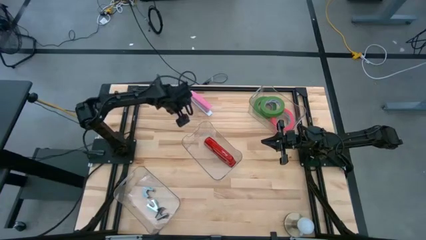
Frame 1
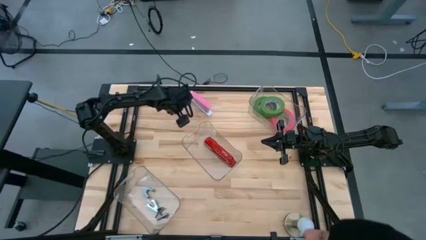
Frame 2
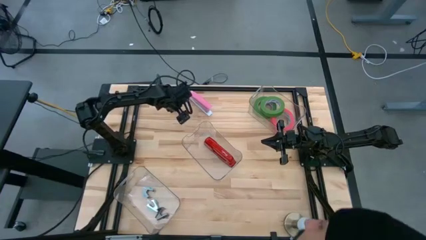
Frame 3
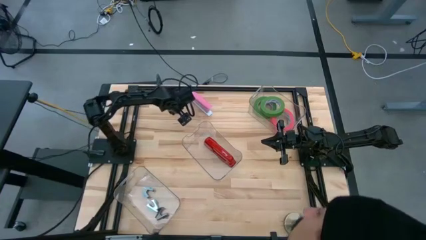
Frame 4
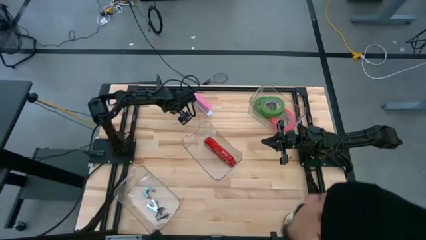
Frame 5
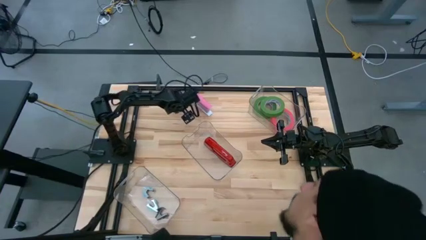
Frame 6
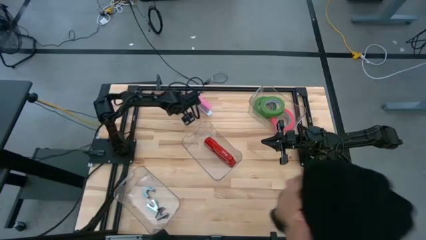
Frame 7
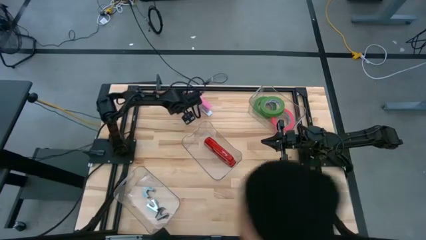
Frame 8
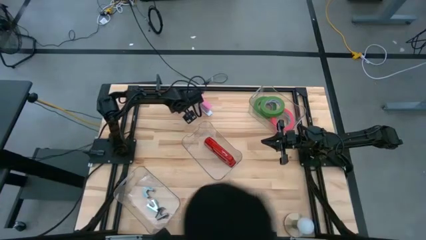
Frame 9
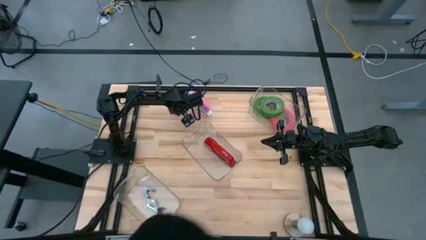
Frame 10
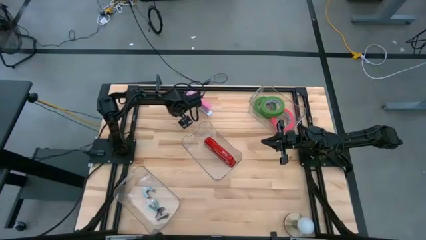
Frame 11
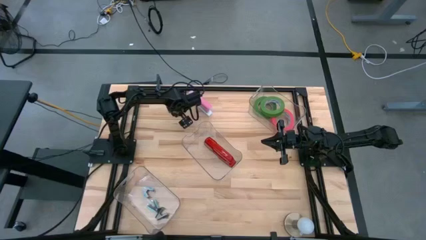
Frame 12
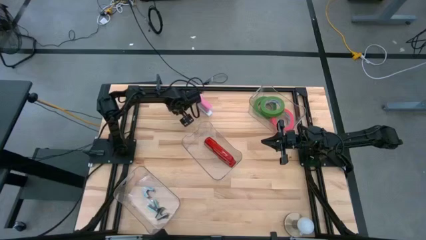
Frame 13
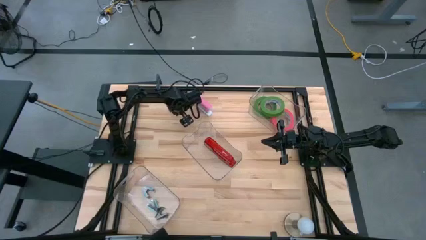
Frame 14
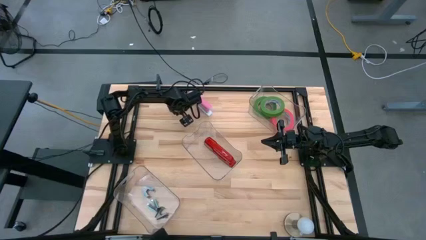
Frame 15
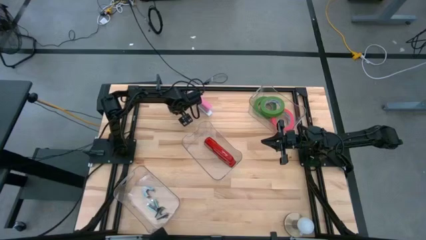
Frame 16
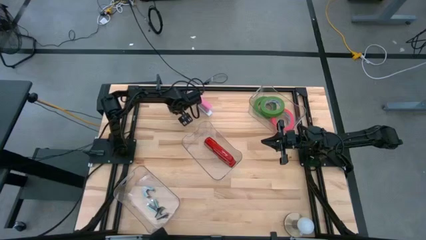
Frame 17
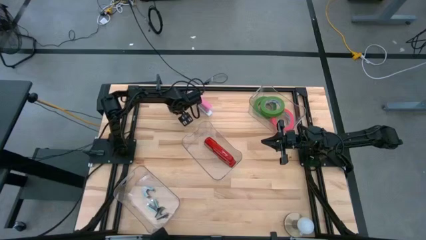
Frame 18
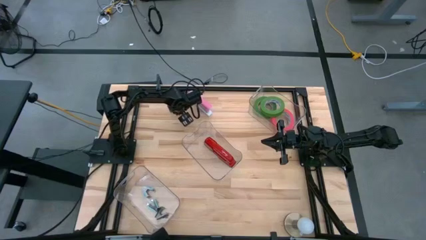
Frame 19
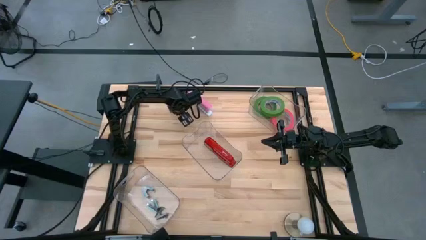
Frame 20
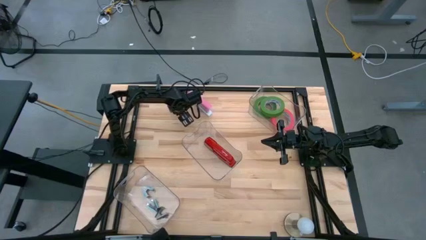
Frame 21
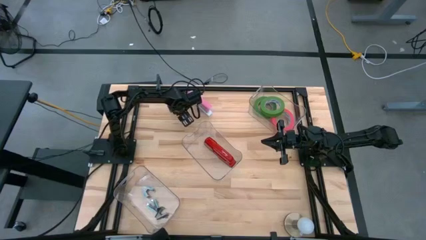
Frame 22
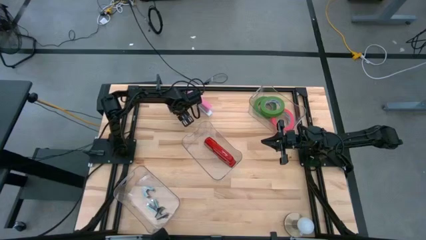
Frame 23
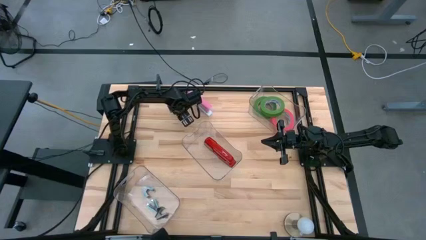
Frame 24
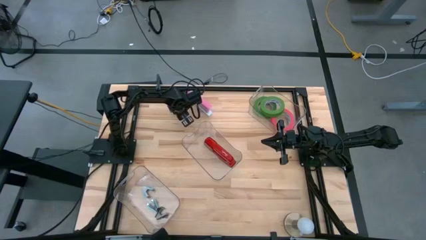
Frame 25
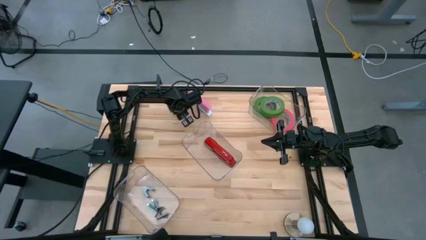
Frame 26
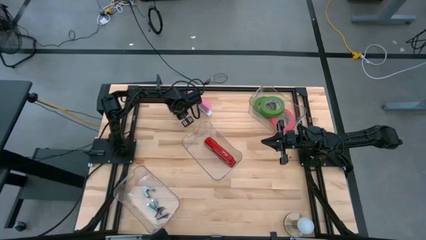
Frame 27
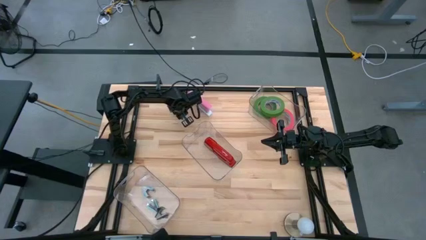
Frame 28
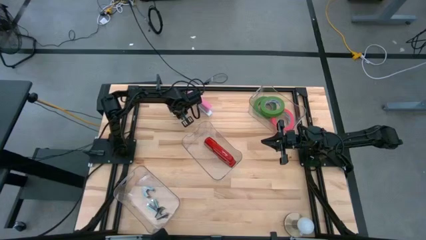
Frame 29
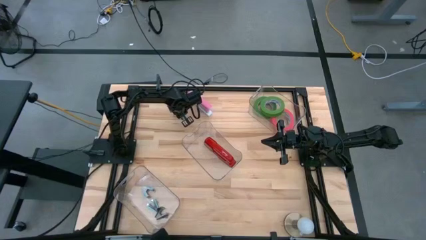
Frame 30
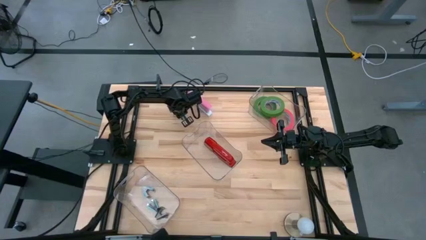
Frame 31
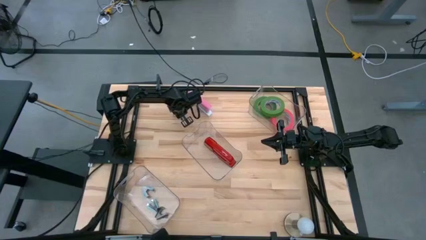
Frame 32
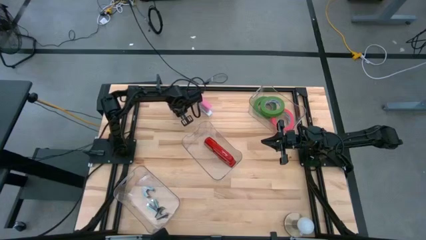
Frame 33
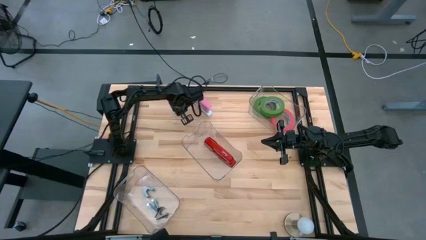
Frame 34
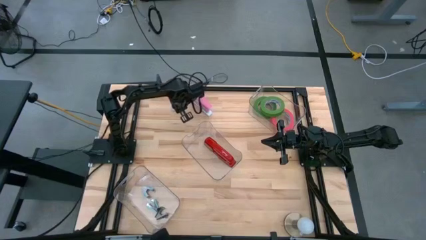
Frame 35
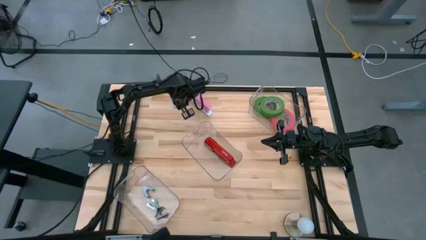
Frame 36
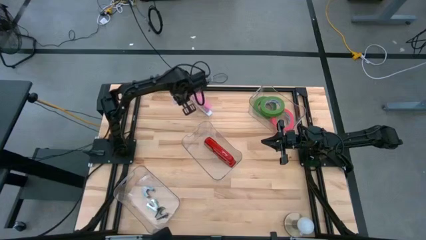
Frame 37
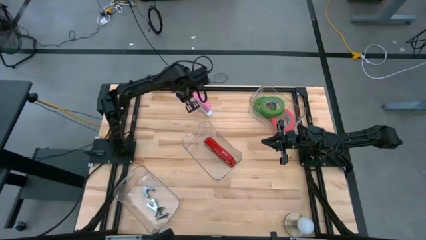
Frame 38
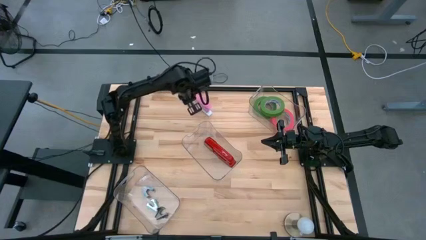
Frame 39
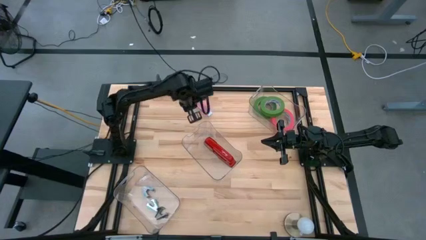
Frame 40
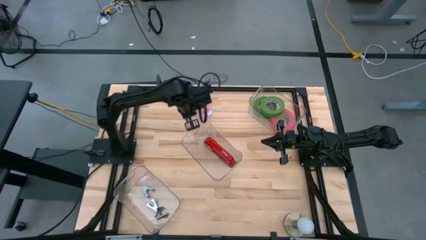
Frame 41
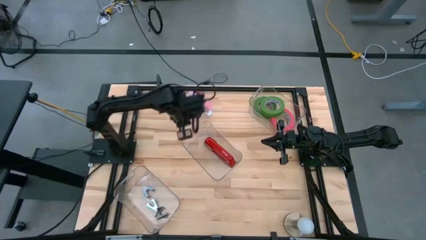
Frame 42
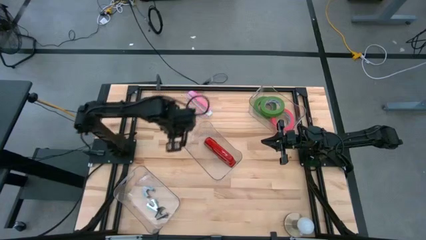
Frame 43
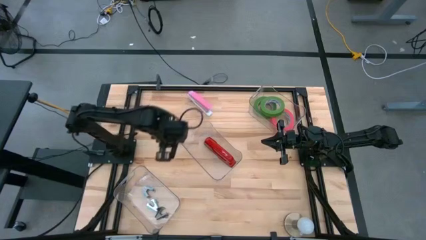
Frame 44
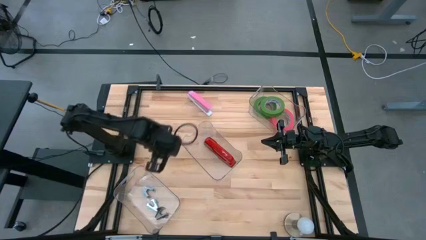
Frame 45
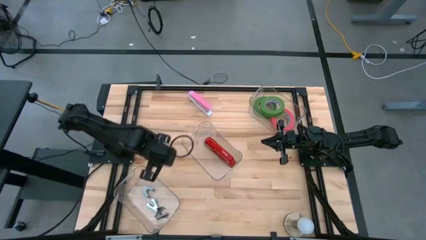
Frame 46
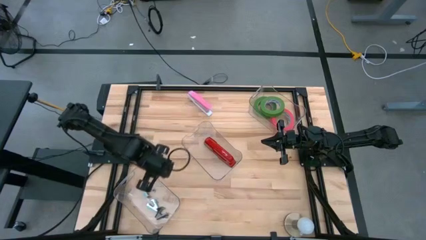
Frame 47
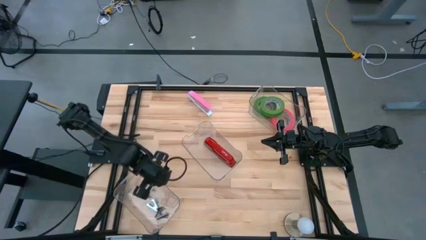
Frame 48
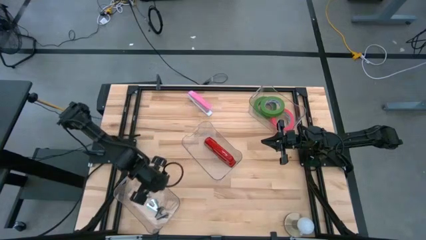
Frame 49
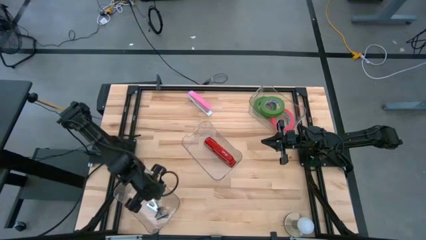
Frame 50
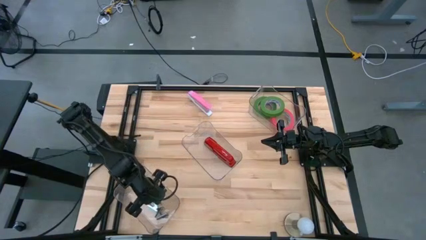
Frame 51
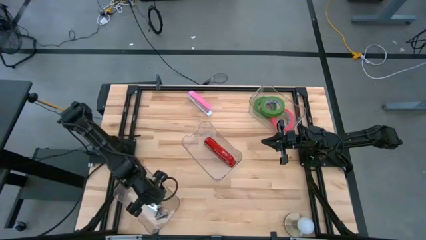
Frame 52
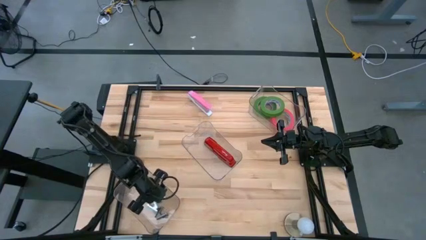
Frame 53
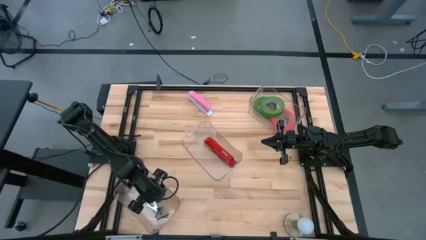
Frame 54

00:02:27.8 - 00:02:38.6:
Task: Pick and place Stapler, Stapler remover, tape
Put the purple stapler remover into the bottom transparent bin

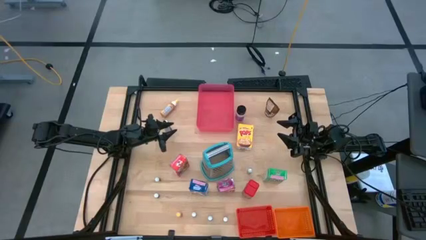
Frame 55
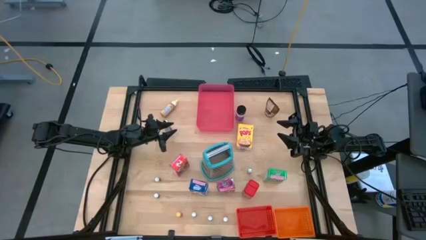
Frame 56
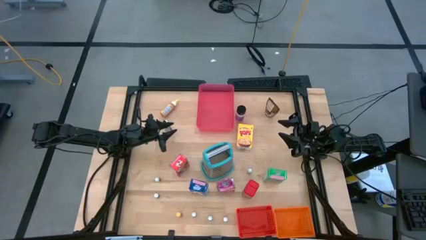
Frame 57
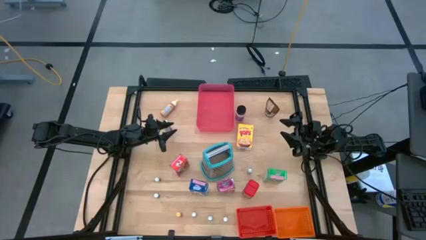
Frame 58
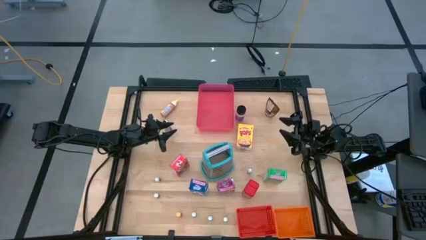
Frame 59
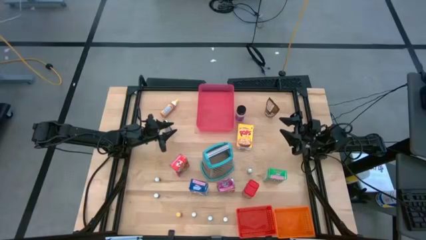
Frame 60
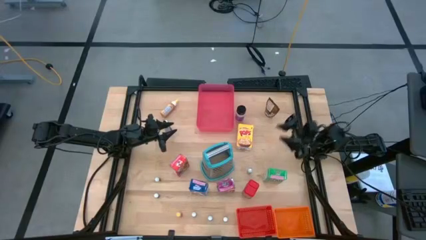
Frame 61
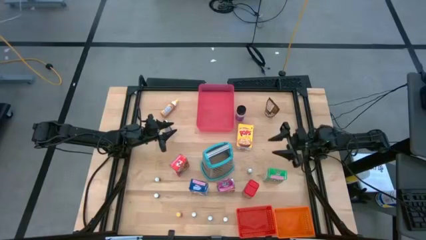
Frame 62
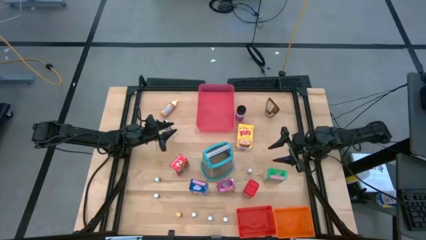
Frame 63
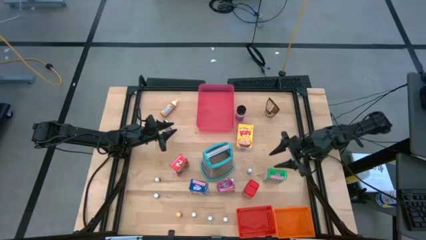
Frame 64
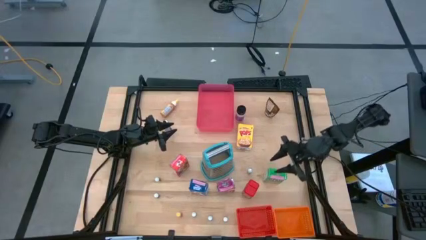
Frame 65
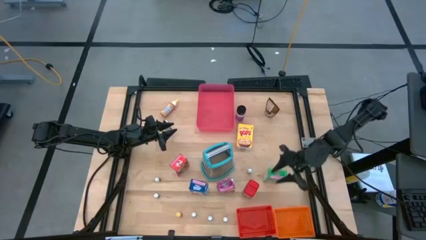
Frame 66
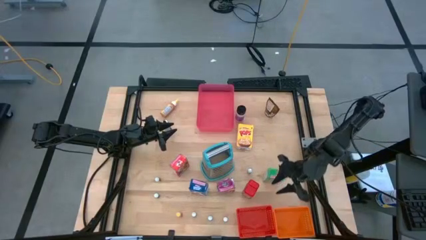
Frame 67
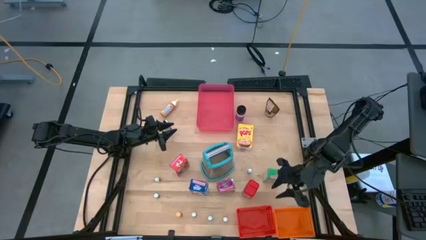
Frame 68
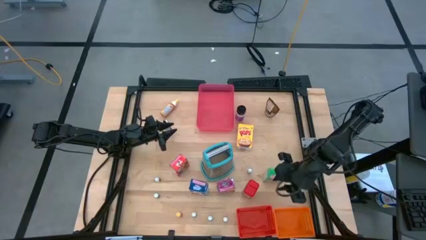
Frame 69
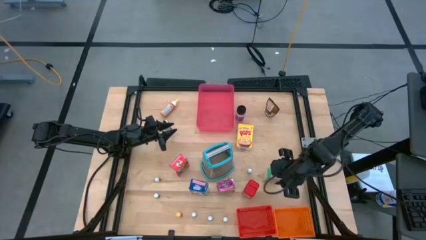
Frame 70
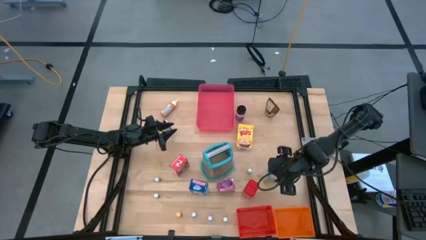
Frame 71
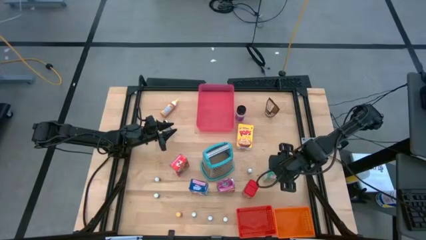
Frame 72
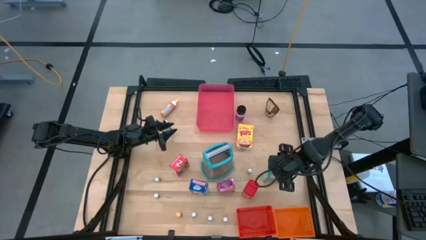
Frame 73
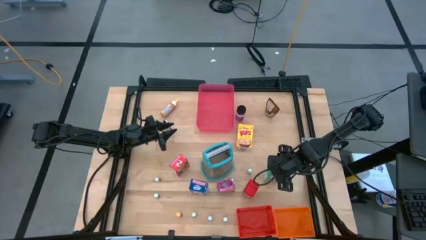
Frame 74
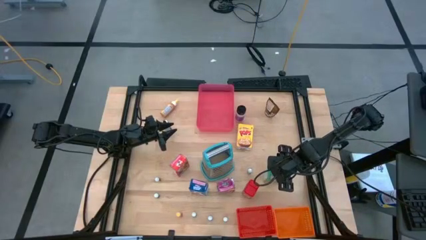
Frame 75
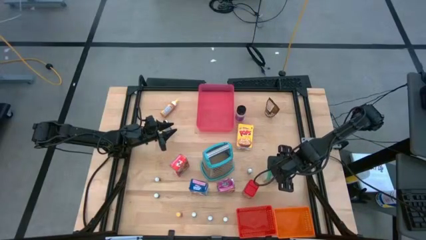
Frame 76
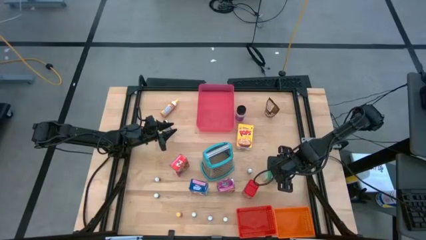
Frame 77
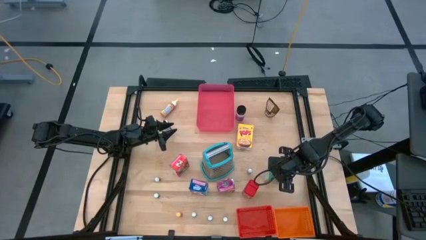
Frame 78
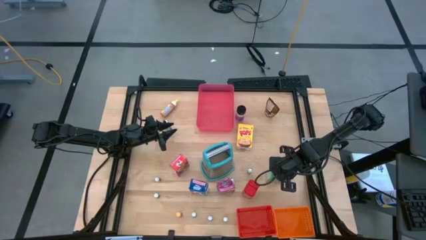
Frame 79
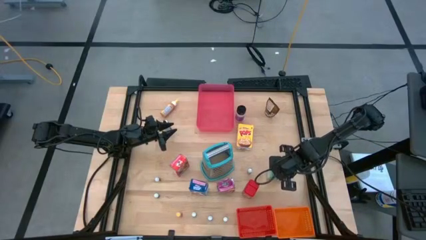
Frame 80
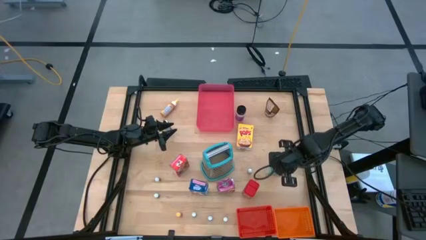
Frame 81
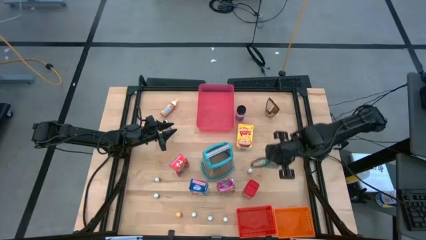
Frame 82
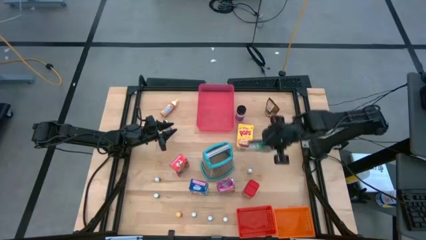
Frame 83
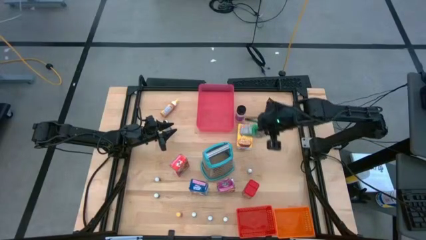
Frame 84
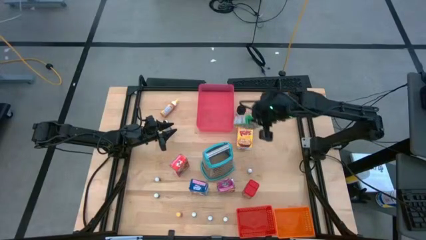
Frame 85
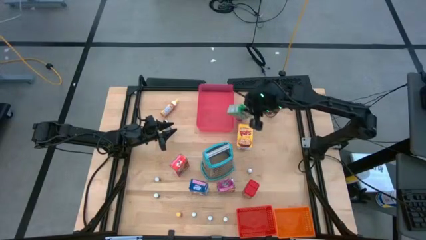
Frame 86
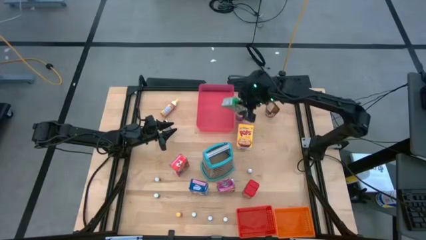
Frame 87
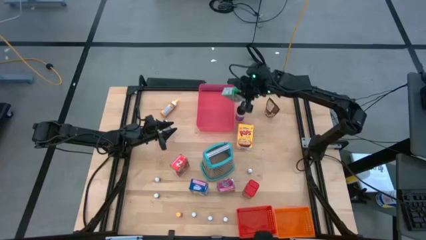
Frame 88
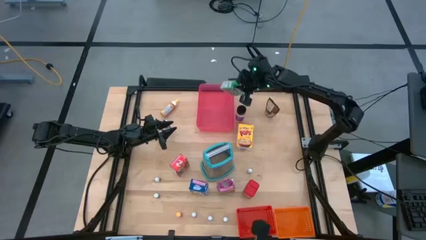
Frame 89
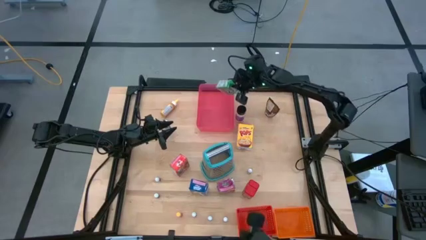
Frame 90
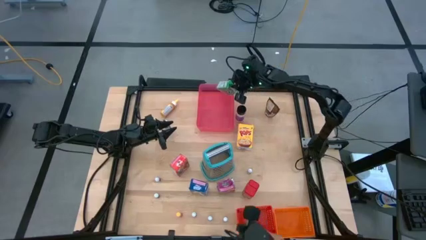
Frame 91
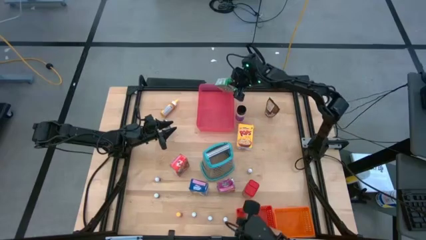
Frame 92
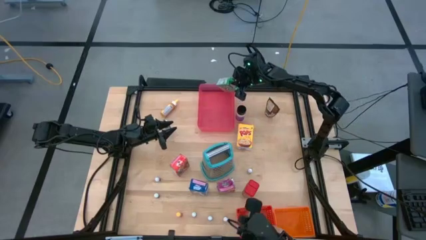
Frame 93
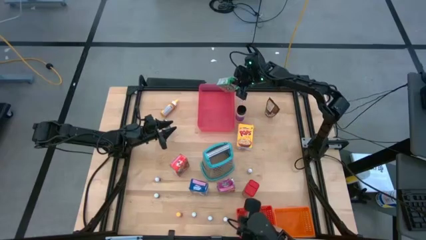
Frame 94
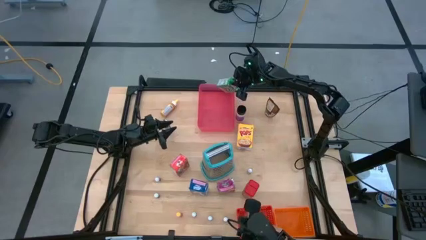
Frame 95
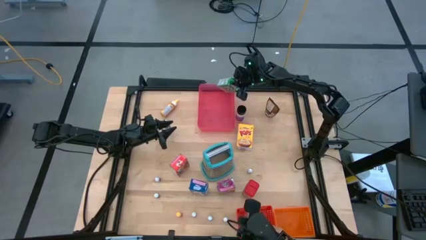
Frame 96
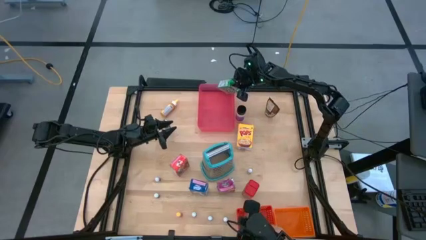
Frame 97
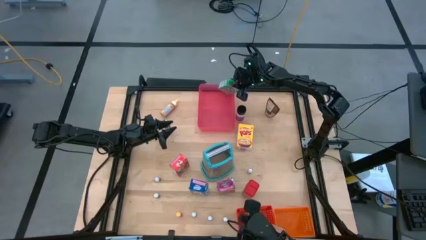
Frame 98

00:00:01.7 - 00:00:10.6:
Task: Pick & Place Kitchen Items
Put the green cereal box into the pink bin
